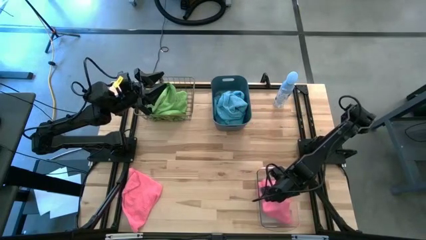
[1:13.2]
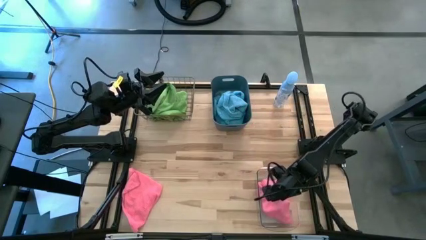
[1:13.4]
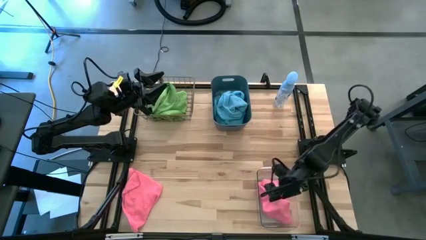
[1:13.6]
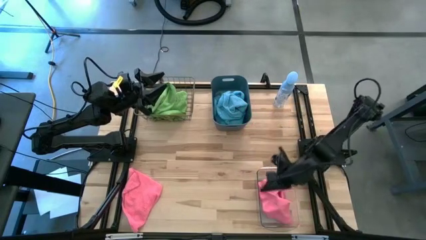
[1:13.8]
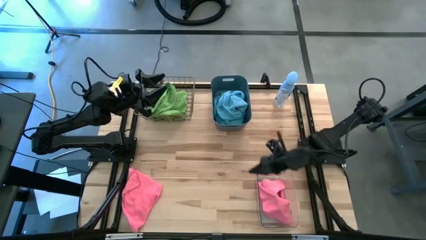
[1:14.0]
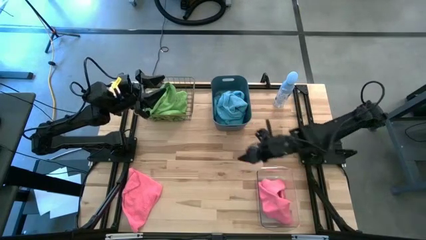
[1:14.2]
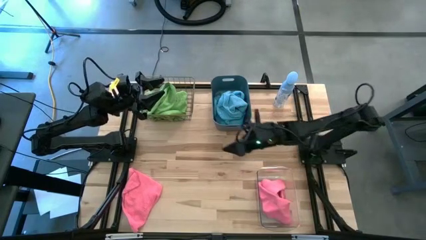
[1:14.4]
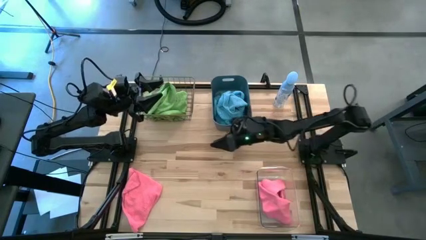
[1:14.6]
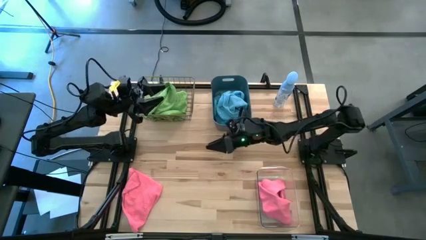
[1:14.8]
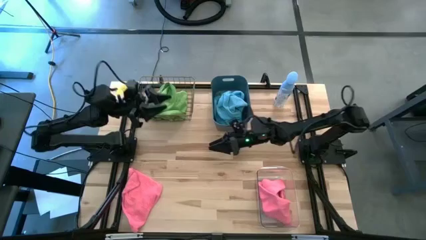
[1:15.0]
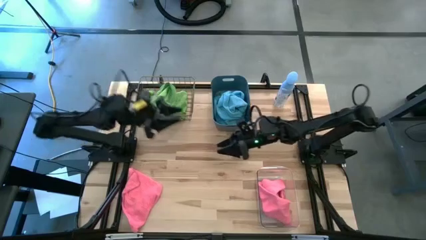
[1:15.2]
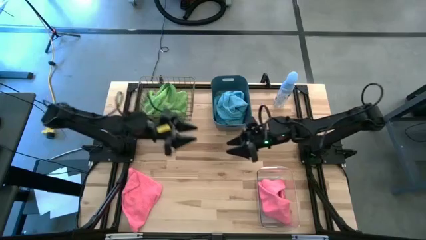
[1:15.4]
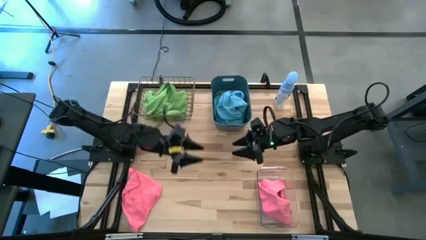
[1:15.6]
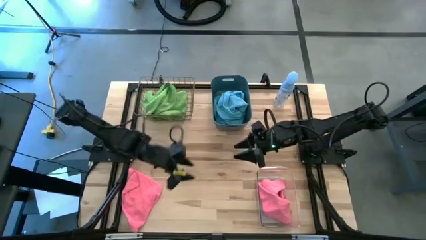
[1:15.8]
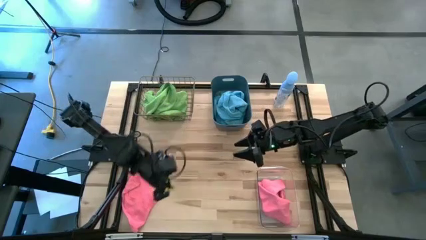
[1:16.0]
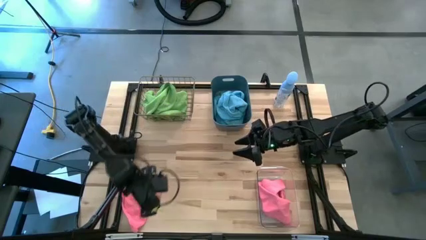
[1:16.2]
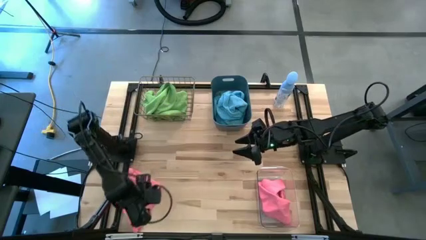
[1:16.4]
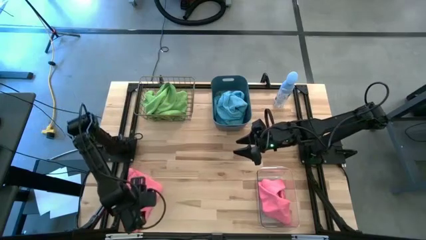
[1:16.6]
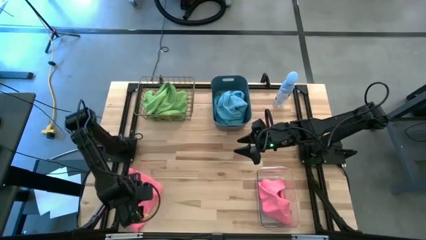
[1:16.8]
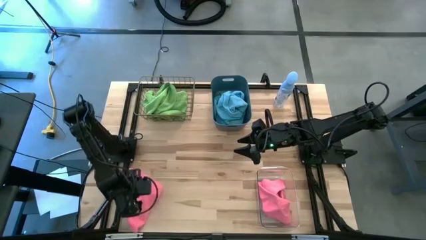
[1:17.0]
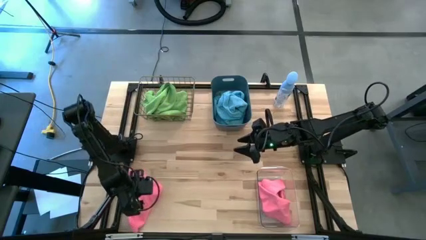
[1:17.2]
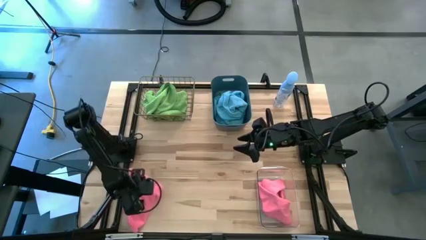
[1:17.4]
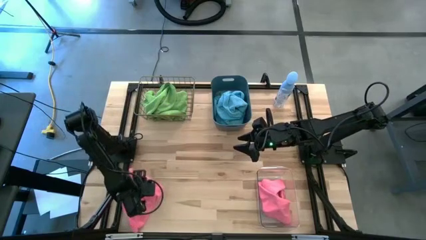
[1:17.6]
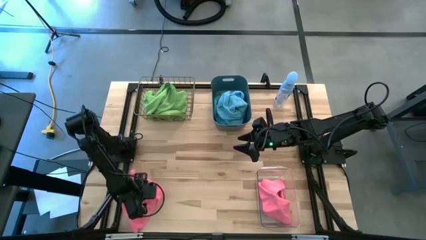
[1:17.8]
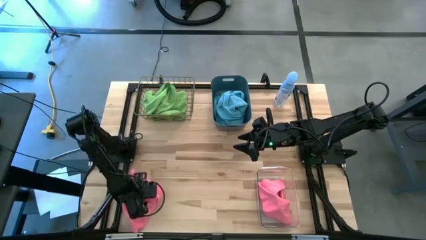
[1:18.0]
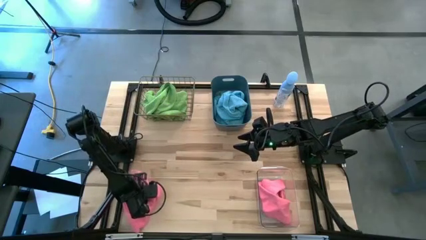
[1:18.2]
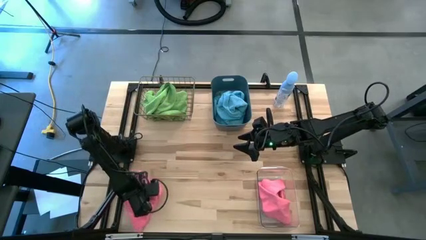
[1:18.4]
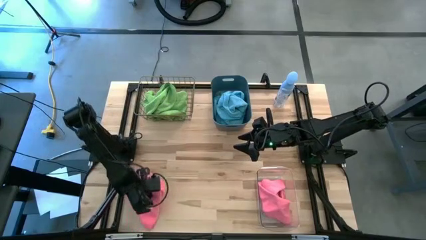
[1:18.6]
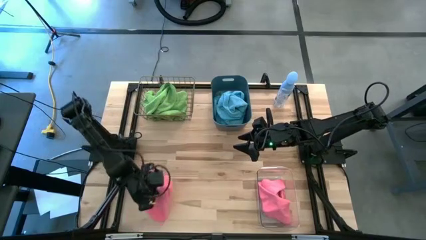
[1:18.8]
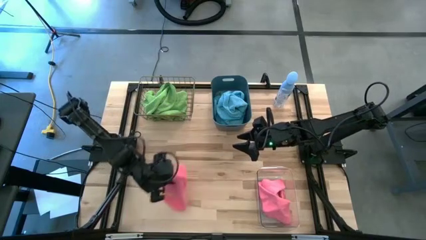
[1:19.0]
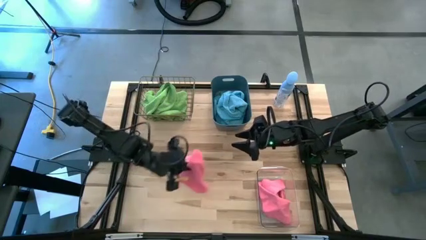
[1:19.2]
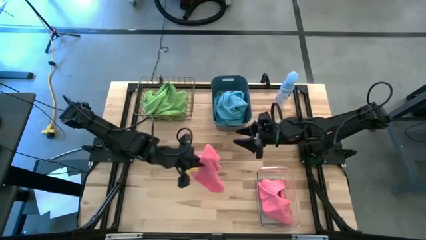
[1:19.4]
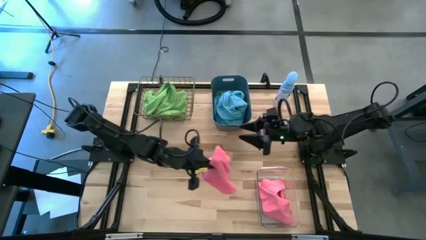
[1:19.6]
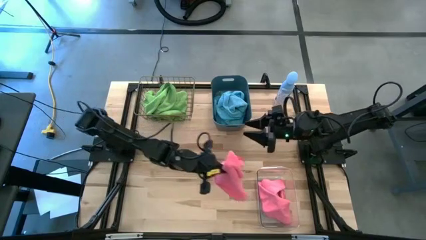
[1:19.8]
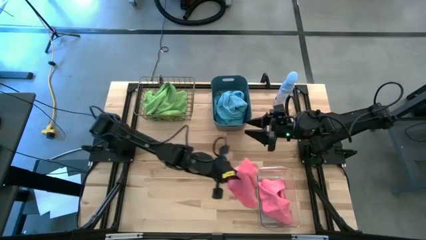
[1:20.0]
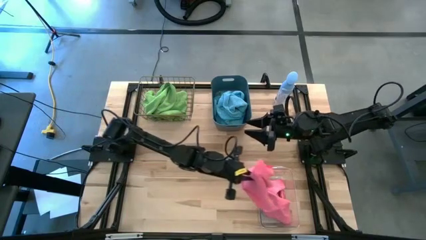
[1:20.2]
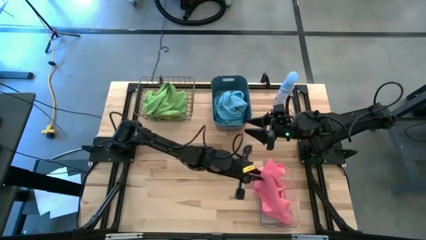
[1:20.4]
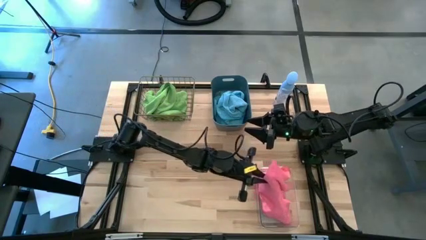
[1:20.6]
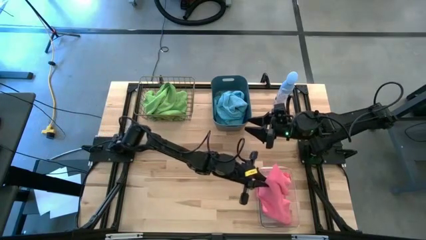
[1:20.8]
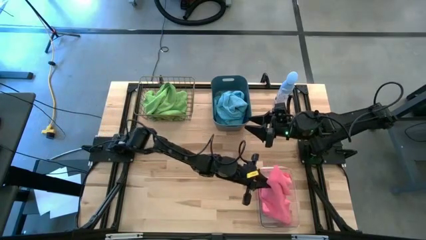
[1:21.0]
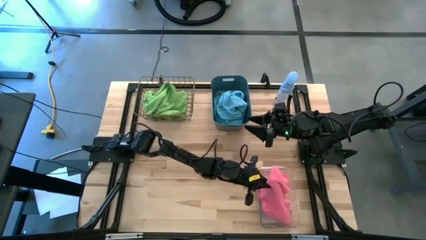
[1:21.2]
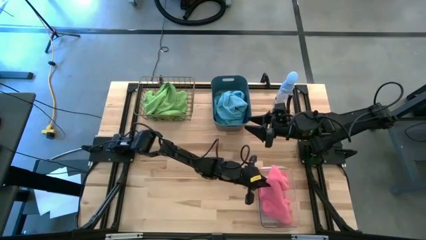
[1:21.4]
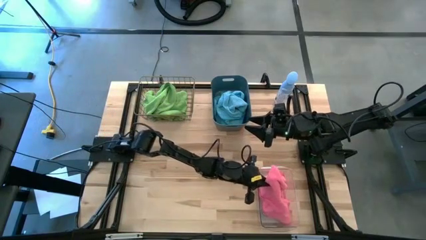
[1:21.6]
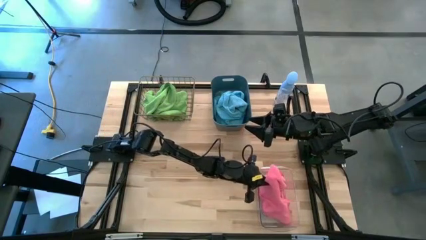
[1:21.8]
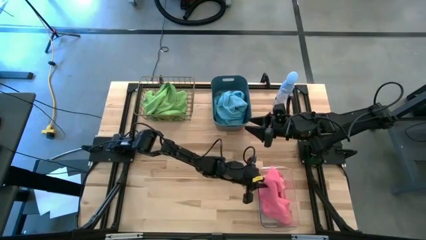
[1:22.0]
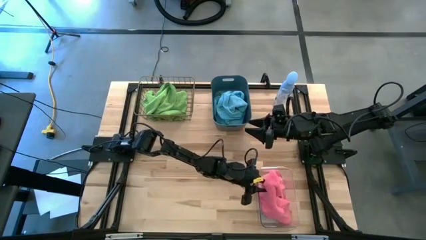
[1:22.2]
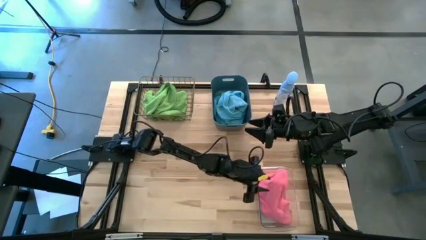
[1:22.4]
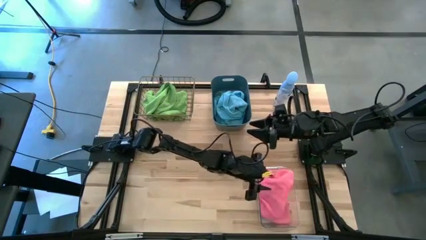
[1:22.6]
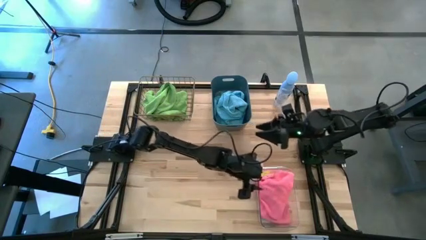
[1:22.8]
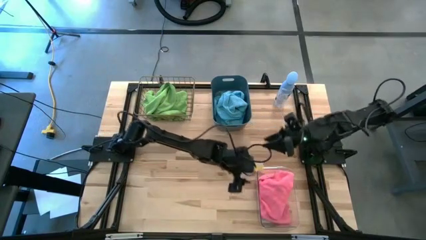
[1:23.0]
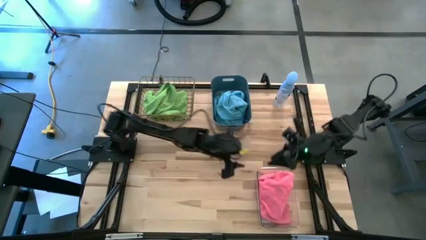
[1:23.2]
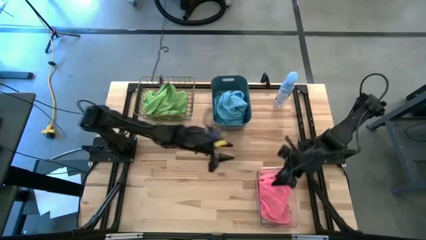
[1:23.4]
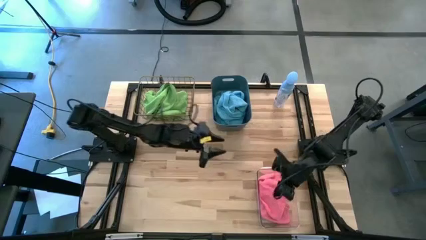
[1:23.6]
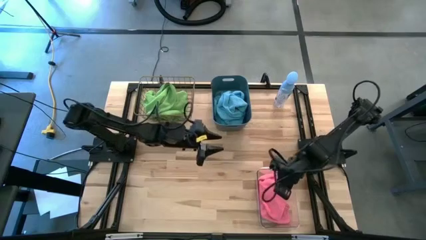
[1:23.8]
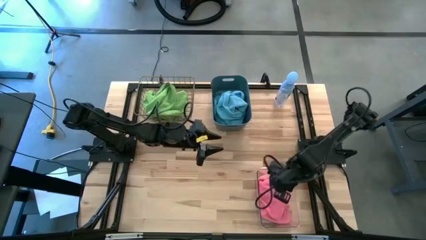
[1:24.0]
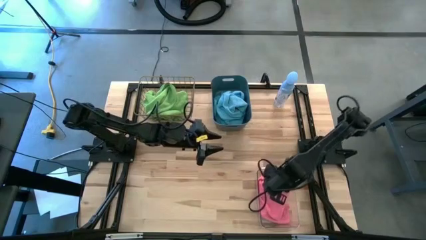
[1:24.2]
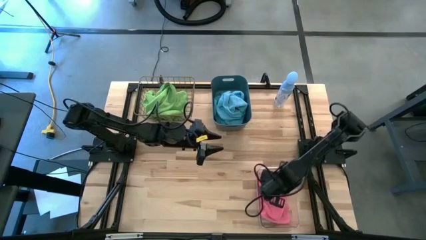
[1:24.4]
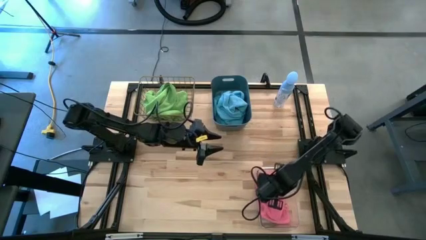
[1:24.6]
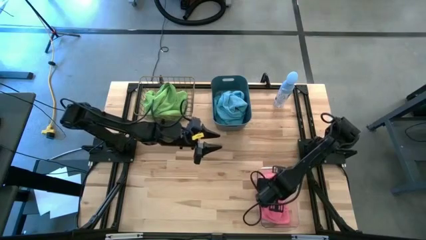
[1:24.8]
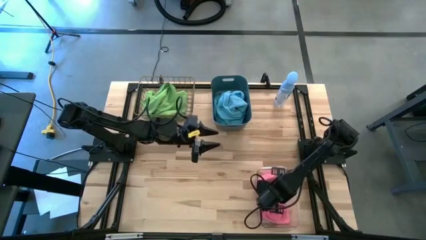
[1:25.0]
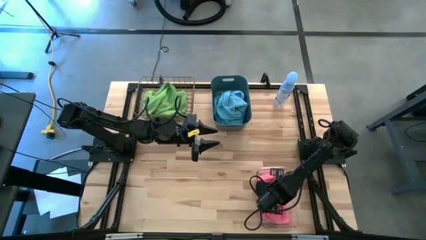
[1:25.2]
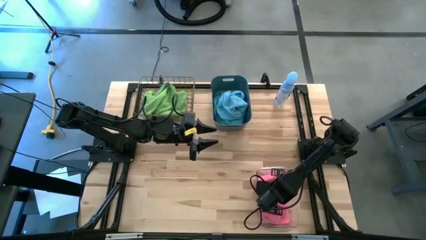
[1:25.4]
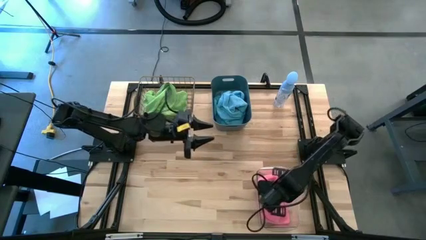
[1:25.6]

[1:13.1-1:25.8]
Task: Sort microfiber towel by color & place in baskets
Put the pink microfiber cloth into the transparent bin

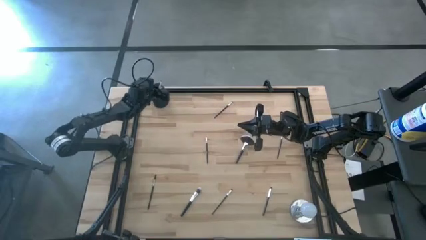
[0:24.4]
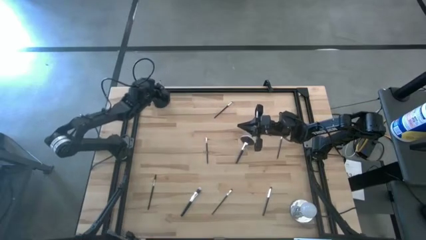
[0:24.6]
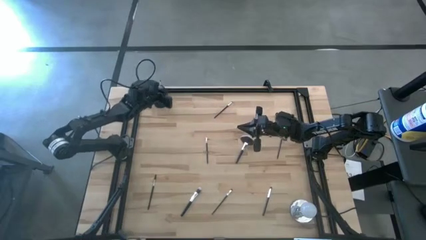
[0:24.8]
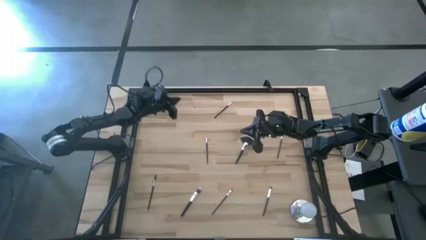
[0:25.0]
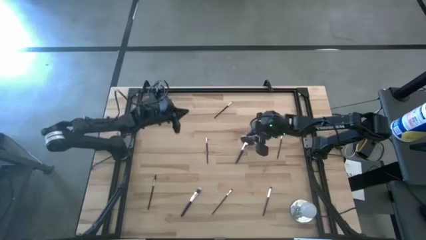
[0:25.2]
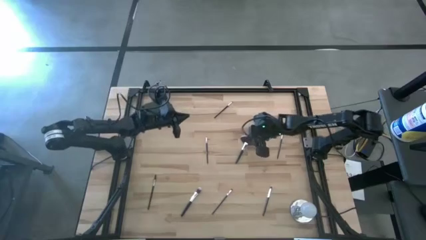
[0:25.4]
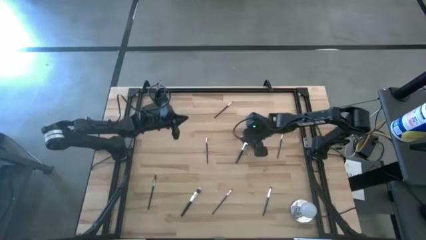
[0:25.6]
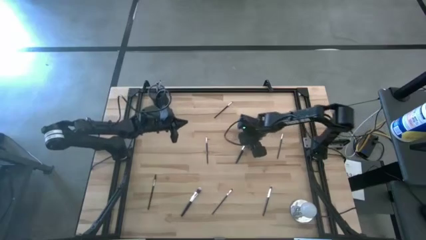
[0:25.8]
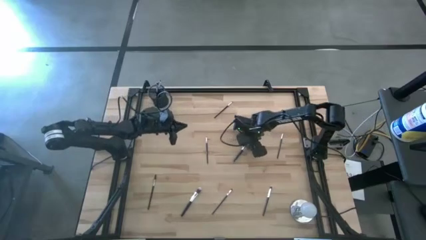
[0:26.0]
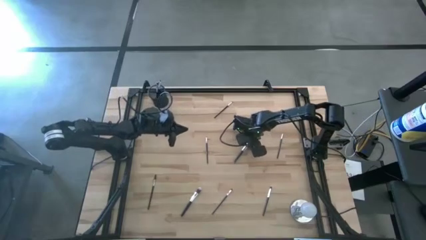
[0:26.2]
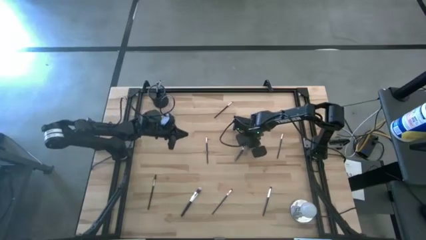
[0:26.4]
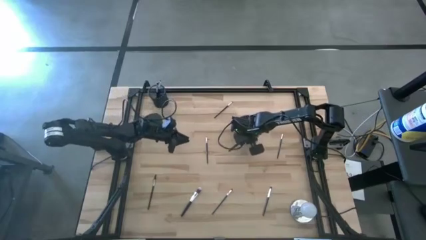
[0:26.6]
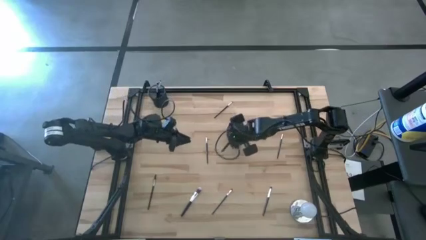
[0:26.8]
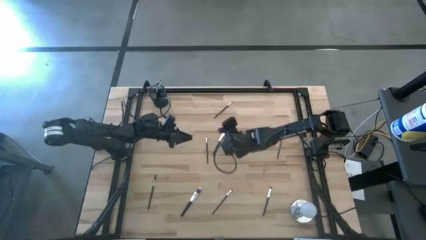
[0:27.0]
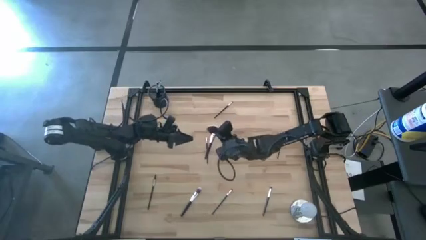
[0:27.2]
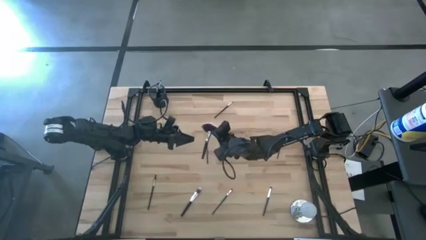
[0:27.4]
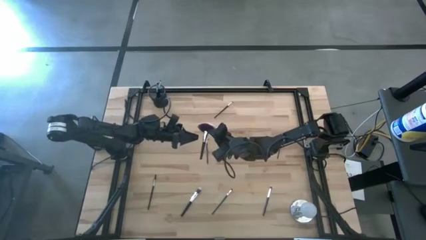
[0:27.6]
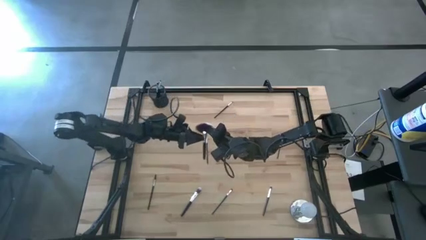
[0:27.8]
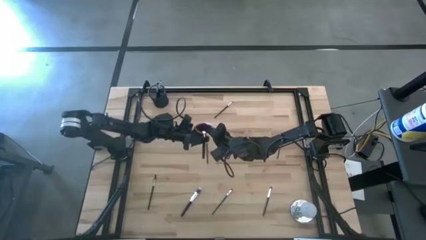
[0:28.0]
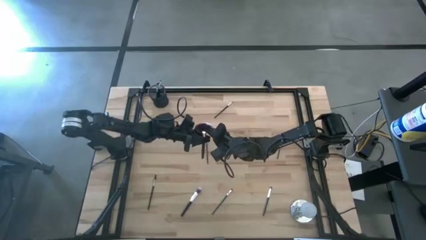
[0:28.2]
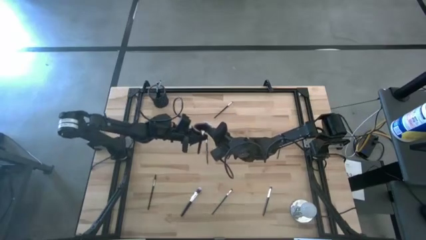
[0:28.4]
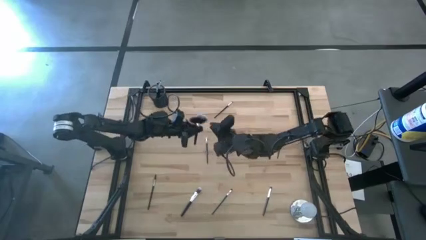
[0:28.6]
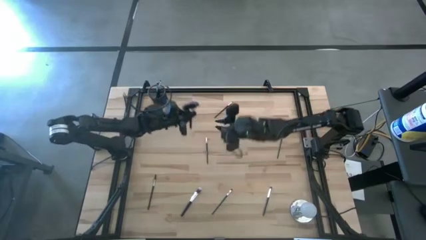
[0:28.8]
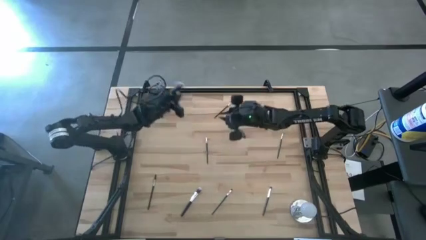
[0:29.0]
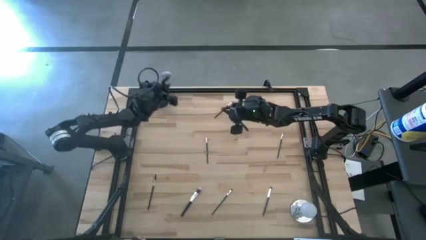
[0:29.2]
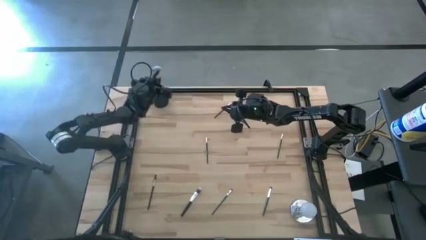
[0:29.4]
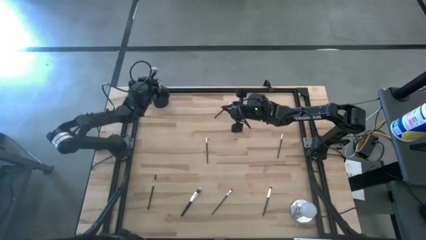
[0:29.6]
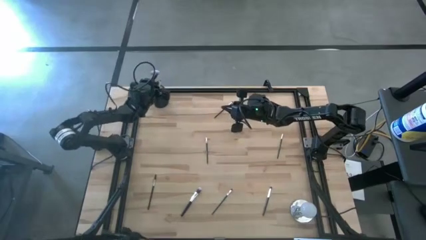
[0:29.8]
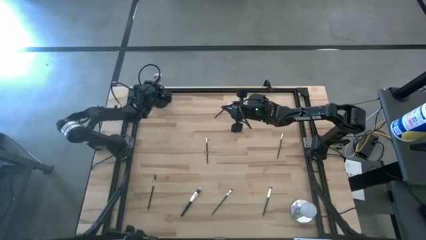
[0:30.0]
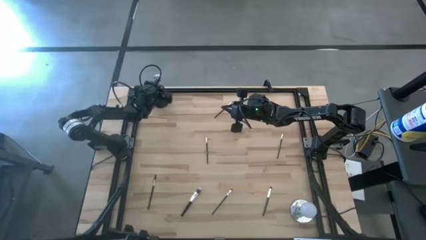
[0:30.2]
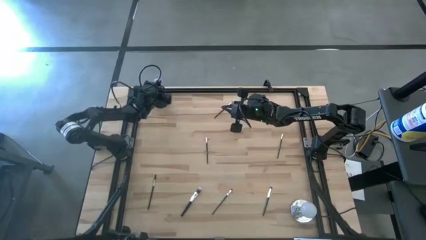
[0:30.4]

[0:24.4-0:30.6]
Task: Put items in baskets/containers
Put the highlighter brush into the holder
